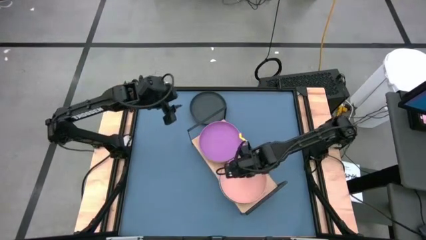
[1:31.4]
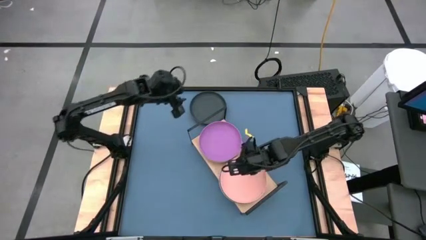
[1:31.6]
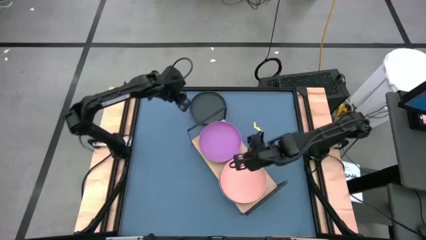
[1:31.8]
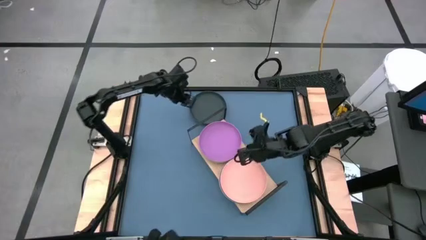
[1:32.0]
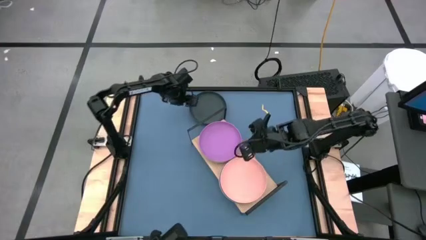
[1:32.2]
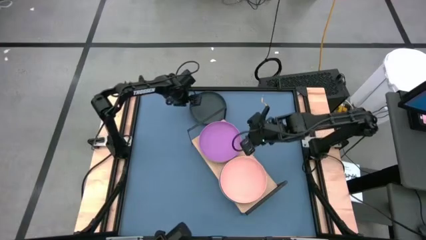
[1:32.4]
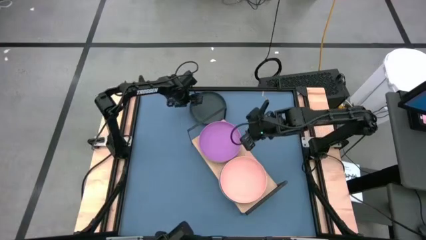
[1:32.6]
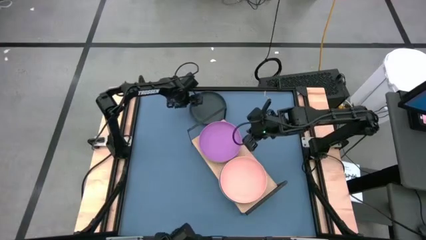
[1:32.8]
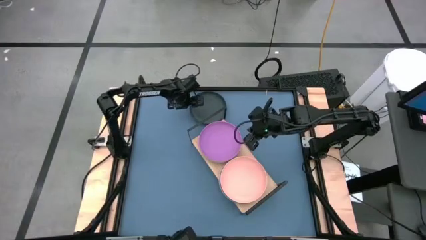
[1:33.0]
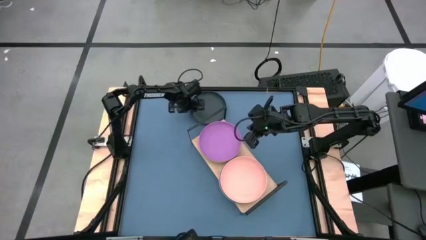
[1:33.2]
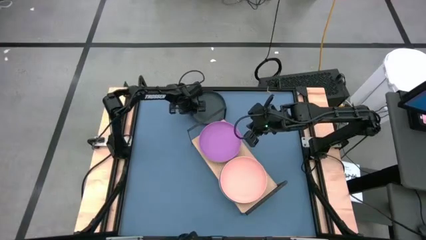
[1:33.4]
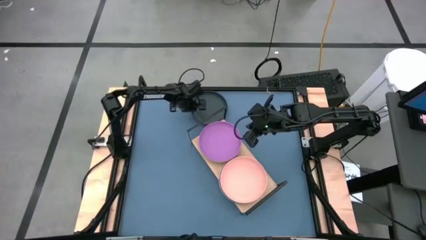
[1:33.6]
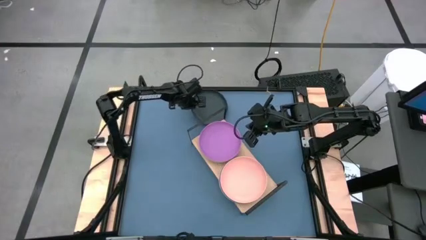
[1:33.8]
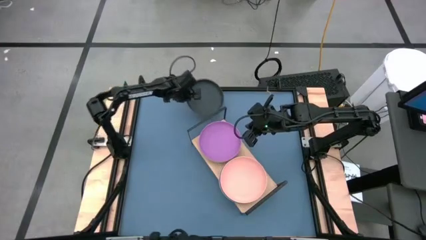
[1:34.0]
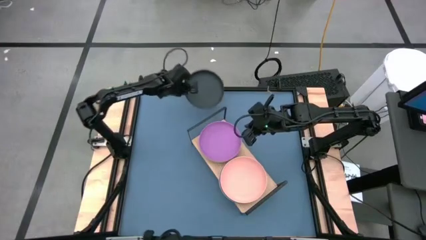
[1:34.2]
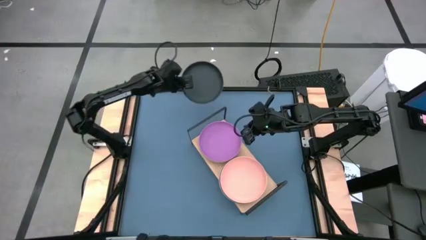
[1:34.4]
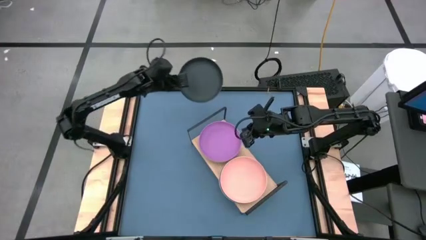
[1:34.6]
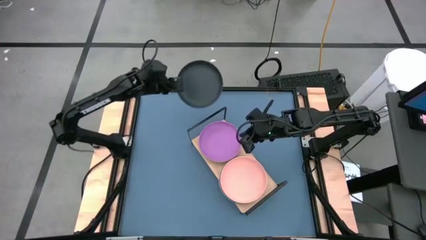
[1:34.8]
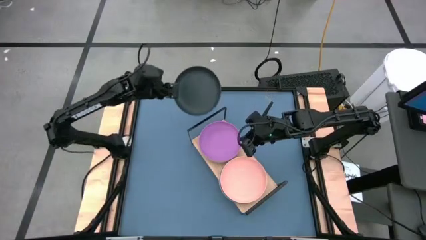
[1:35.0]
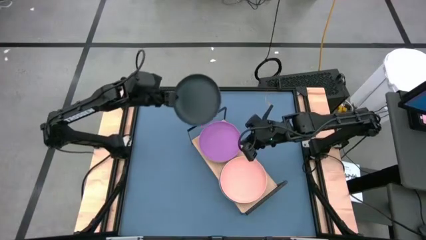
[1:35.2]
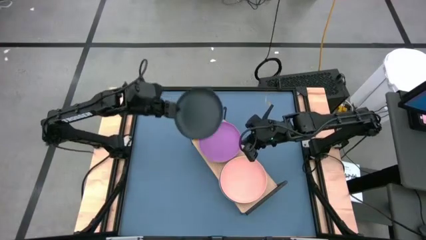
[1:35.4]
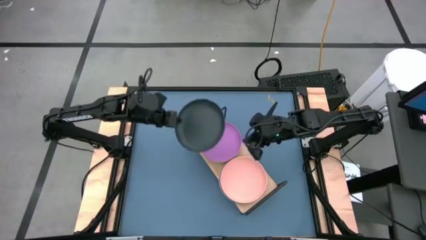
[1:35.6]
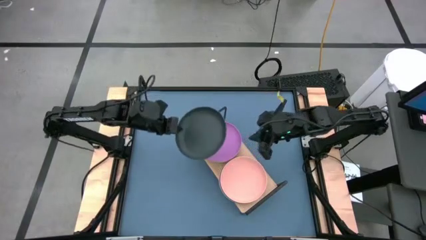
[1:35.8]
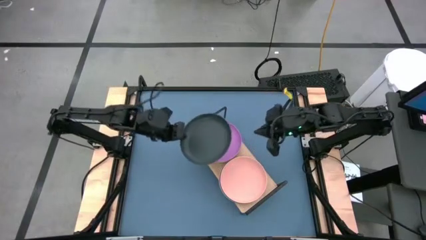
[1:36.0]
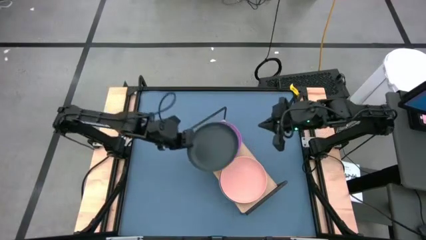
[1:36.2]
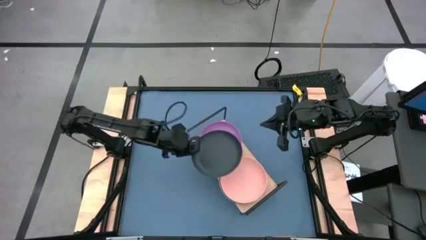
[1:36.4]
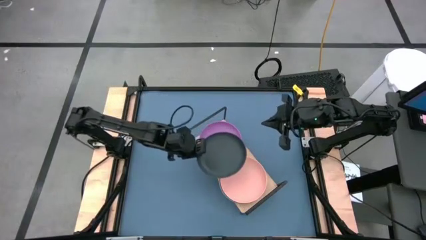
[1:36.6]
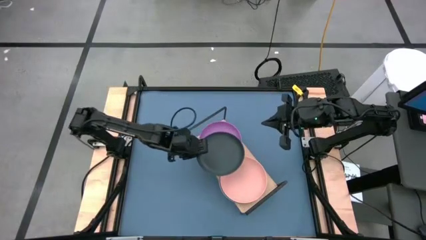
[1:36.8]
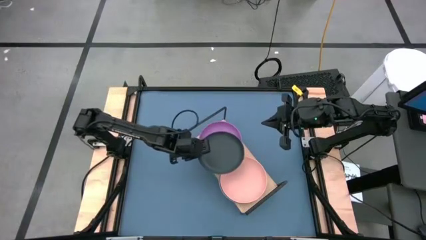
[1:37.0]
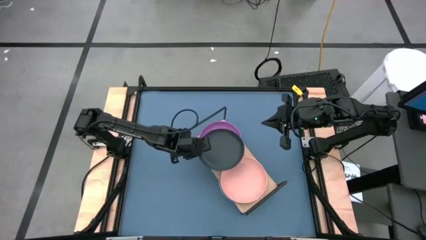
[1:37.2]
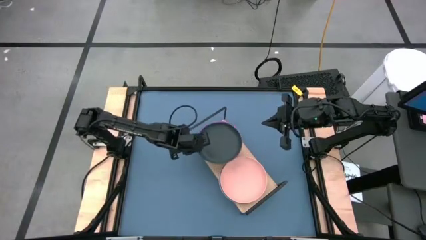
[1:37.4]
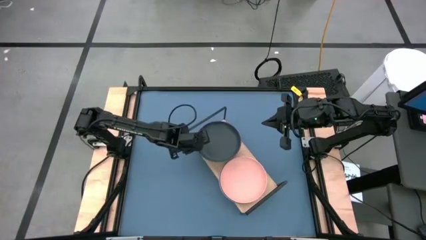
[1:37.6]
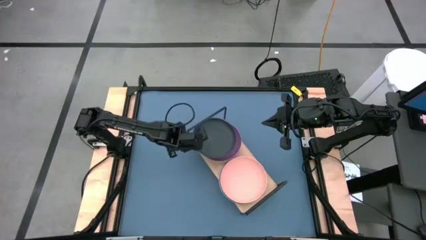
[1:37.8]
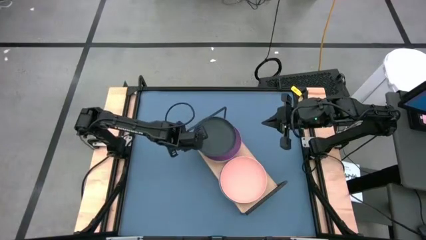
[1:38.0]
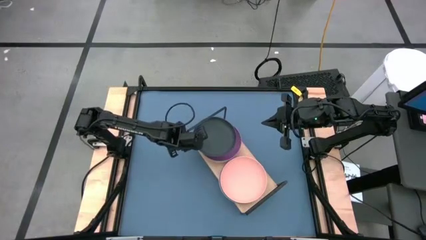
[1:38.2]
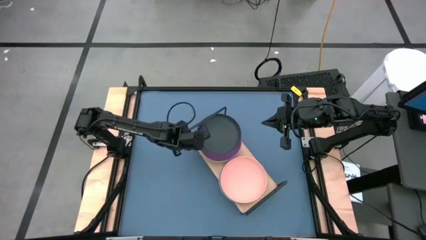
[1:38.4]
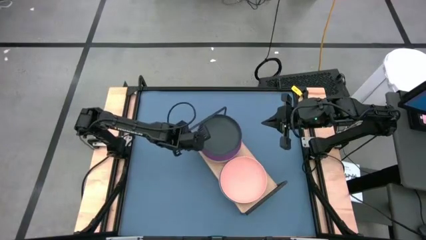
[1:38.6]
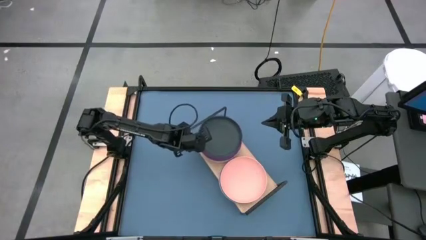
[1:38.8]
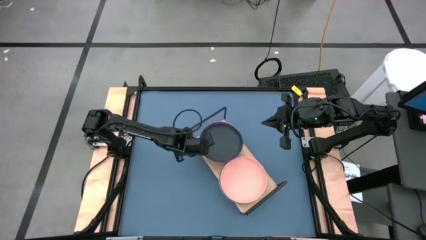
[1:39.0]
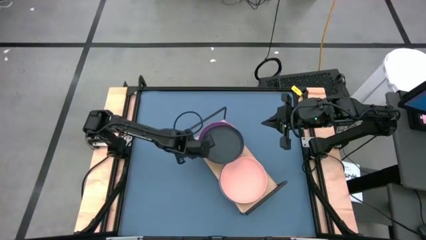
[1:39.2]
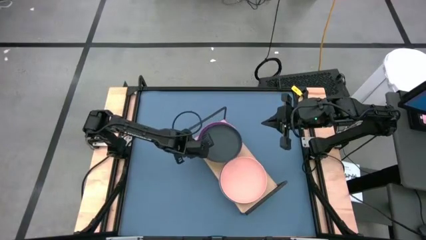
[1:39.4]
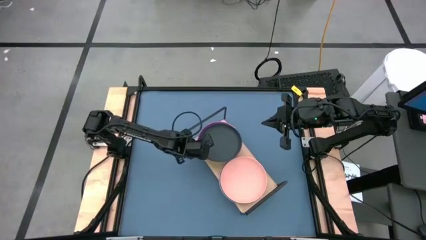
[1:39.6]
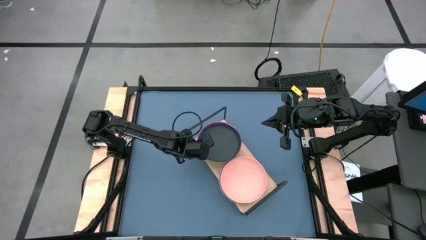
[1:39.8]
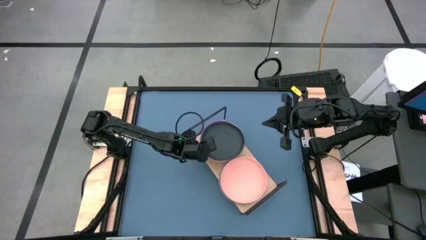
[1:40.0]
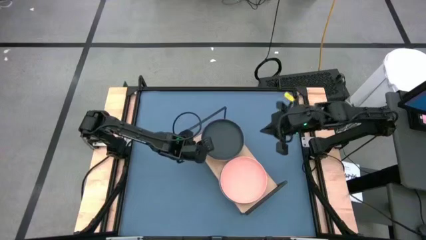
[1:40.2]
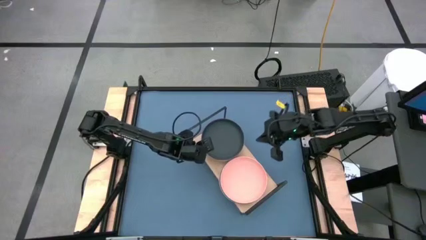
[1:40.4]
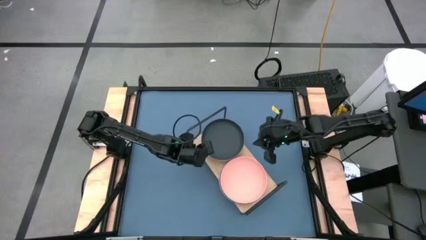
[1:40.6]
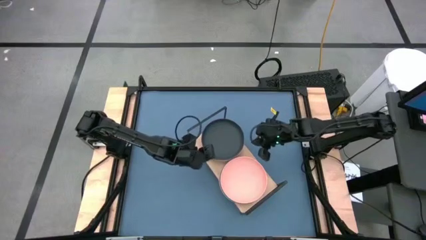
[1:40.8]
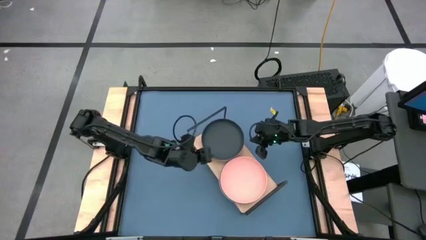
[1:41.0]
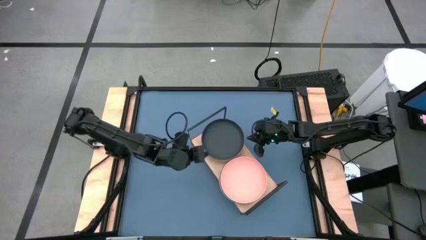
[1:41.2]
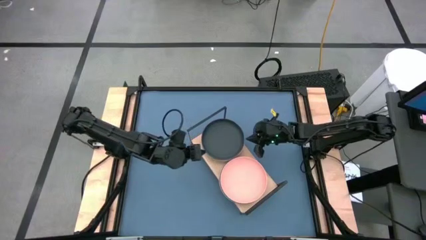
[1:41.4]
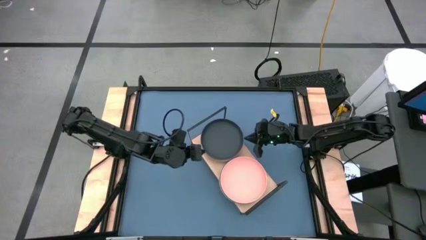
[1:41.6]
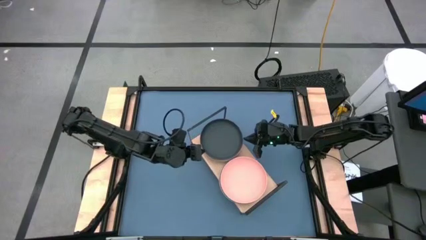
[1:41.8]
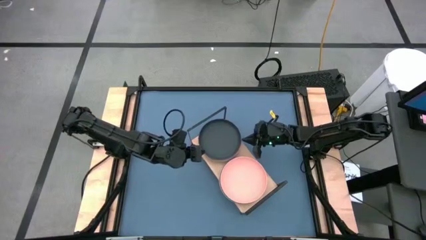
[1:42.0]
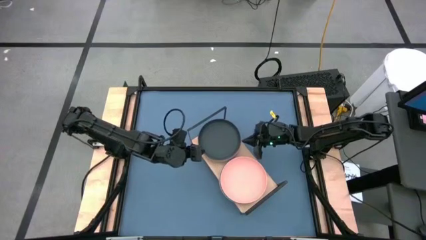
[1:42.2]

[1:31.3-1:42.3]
Task: Place and stack plates onto a shelf
Stack the black plate on top of the purple plate on the shelf

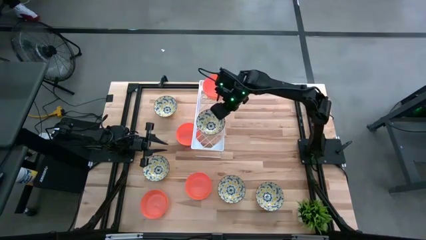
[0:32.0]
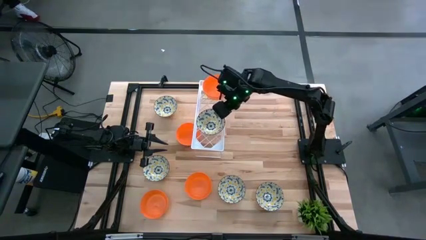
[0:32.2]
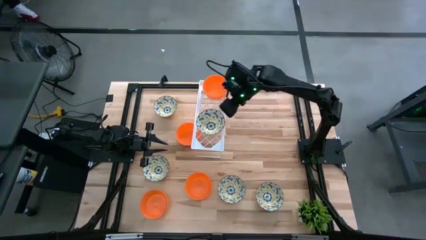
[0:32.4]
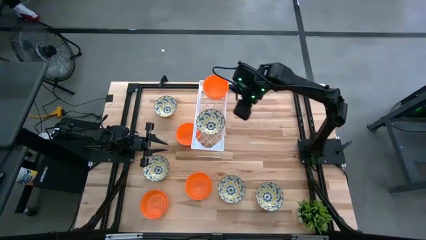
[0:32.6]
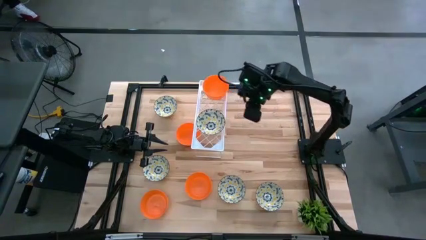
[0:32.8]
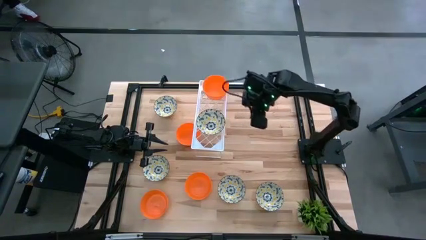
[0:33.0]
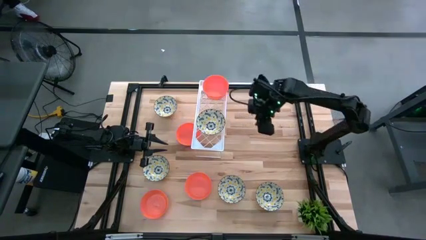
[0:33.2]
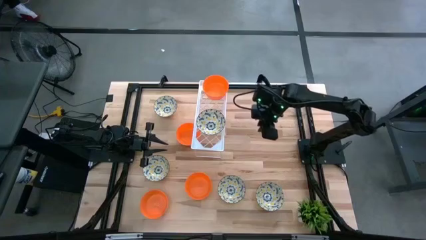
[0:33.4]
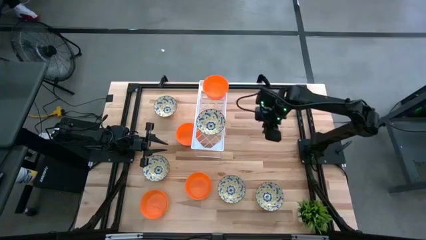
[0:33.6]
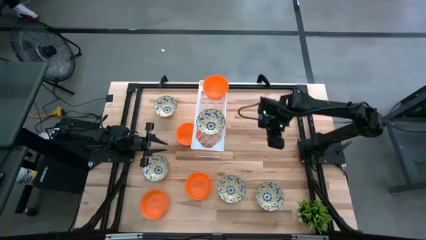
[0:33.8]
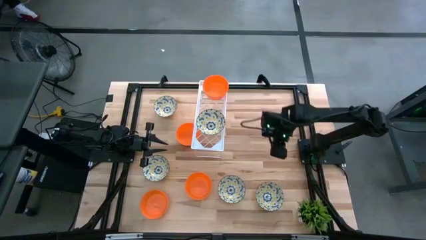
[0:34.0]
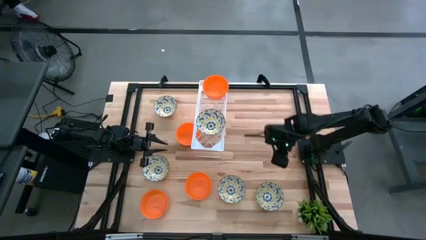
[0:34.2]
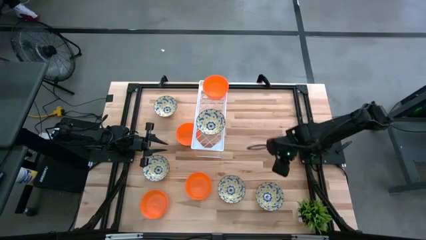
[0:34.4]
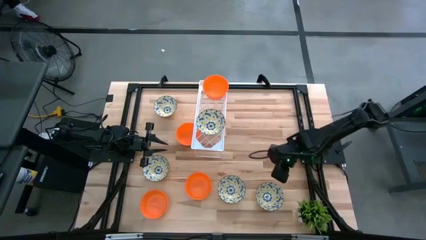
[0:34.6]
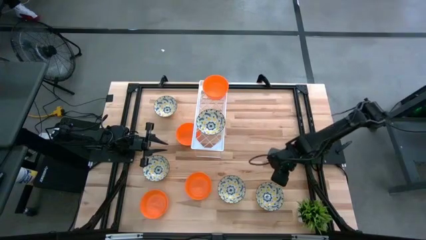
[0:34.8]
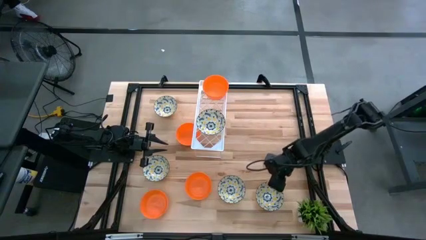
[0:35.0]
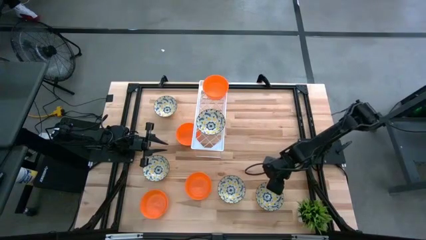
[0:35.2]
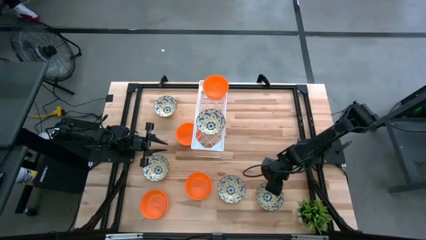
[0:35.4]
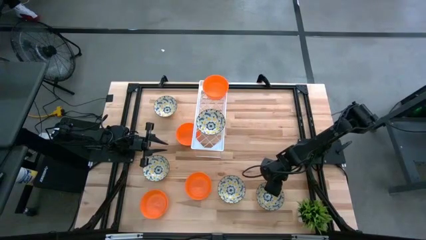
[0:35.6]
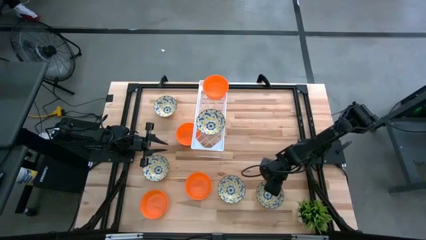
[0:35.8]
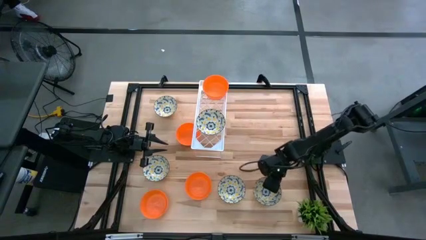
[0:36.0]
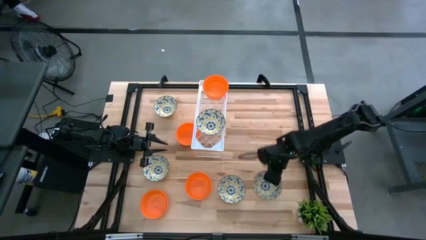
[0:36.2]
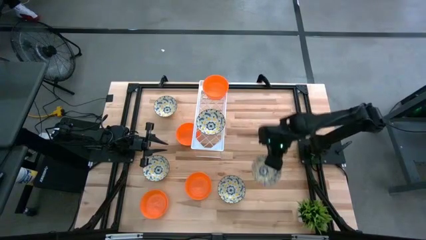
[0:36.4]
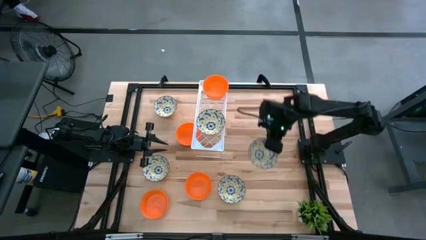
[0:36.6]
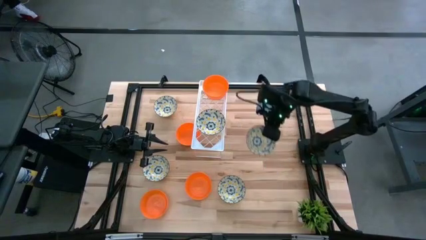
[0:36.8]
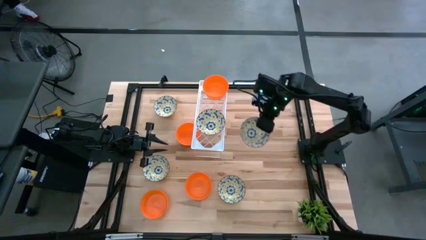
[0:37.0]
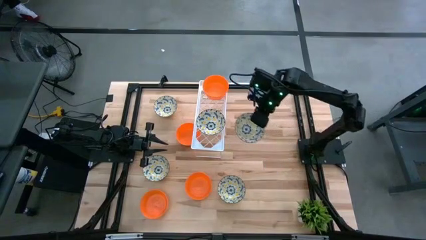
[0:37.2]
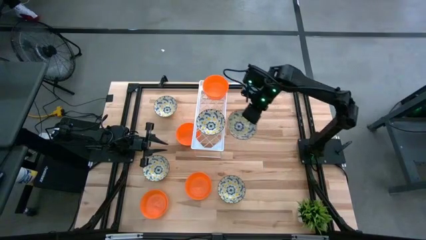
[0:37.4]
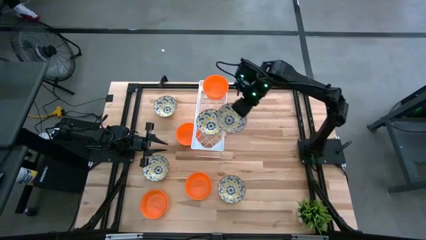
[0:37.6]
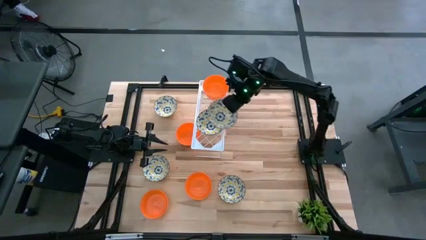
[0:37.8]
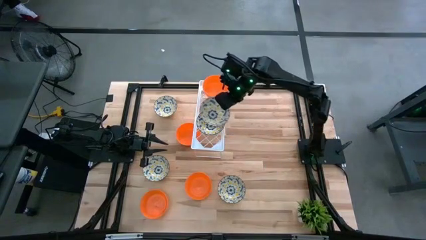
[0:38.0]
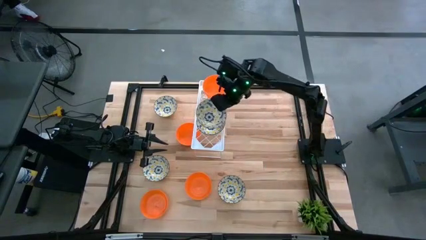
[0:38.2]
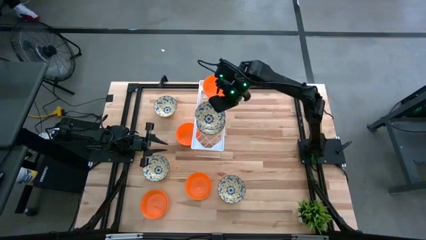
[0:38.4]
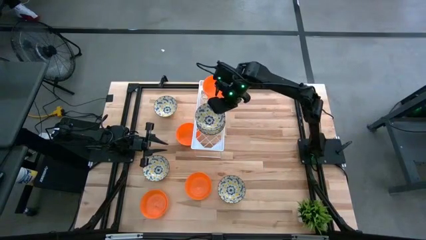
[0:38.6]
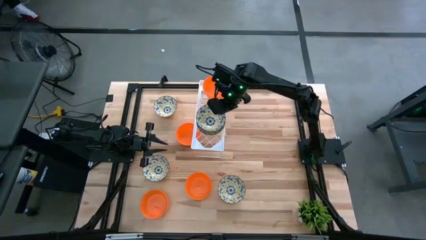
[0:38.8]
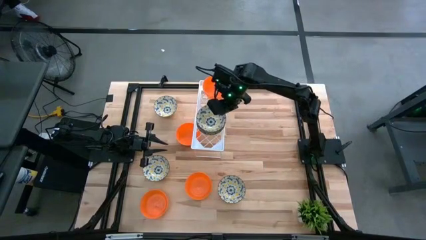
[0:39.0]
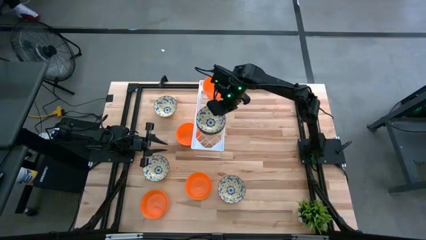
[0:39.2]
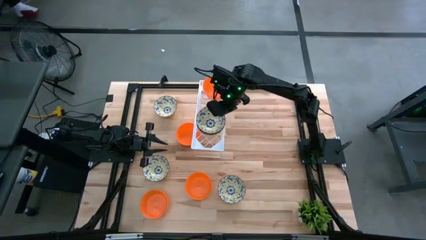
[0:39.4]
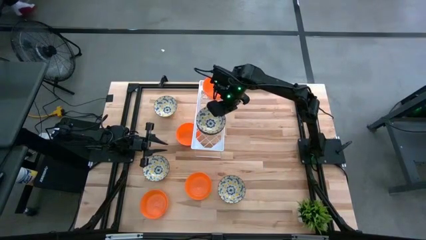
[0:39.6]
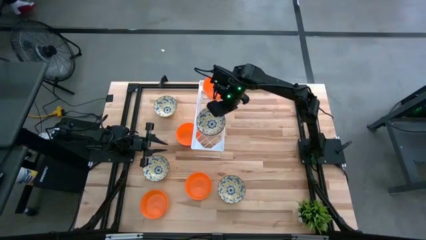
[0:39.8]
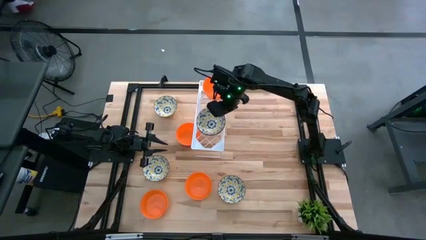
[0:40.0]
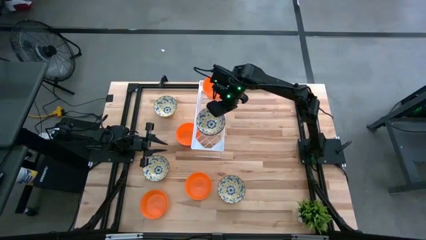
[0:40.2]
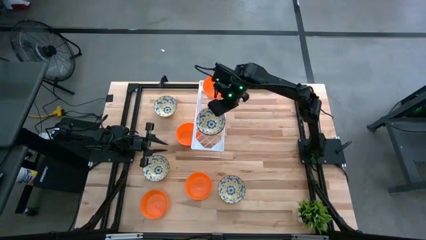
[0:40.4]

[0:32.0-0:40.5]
Task: Pick & Place Mini bowls
Stack the white and yellow bowl on the white and yellow bowl on the shelf
